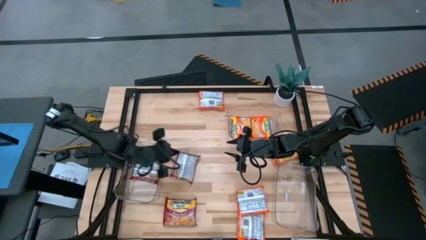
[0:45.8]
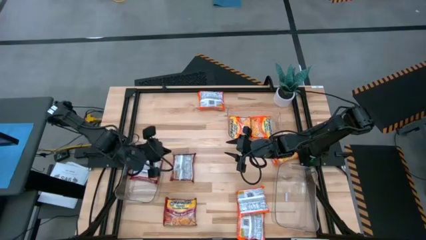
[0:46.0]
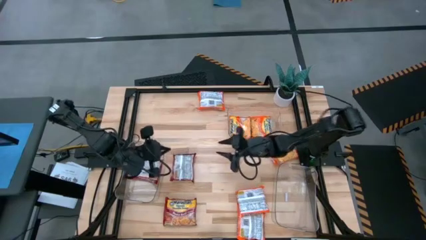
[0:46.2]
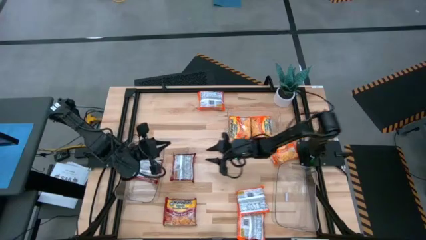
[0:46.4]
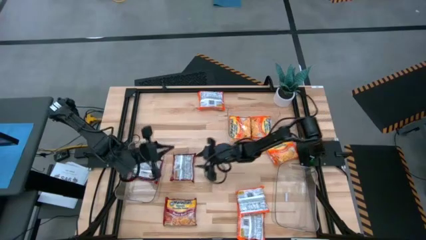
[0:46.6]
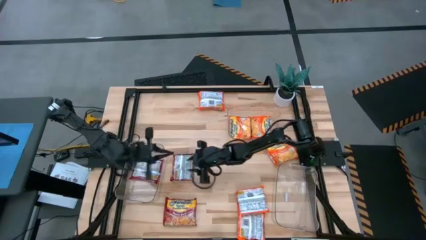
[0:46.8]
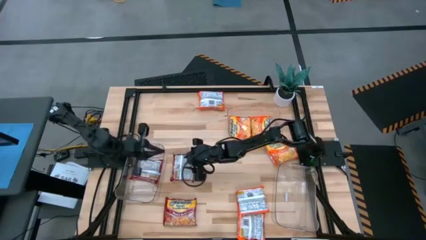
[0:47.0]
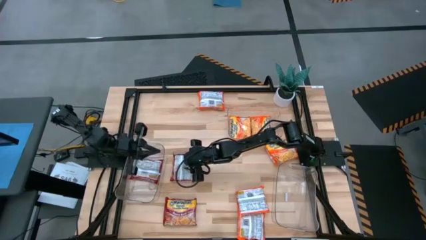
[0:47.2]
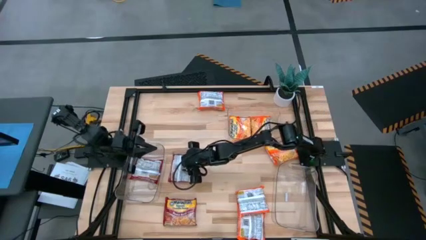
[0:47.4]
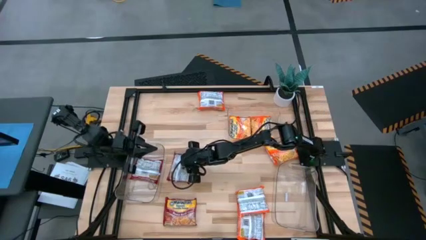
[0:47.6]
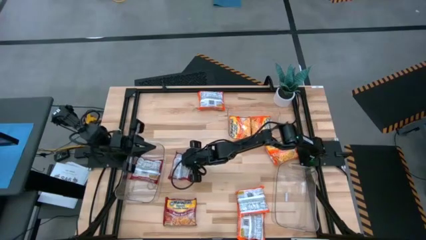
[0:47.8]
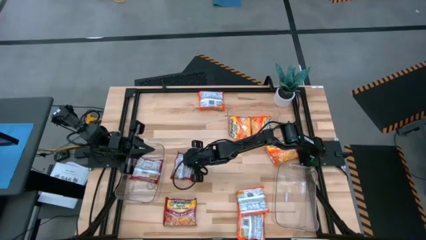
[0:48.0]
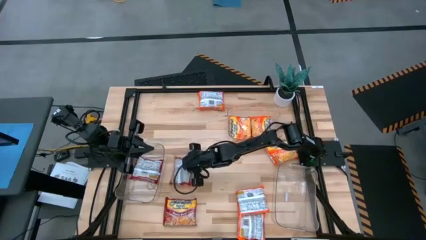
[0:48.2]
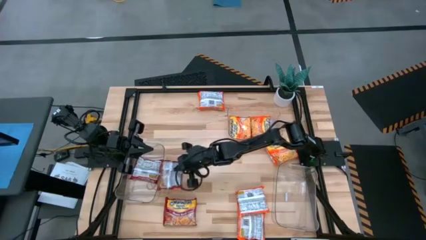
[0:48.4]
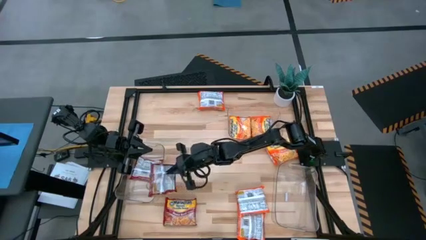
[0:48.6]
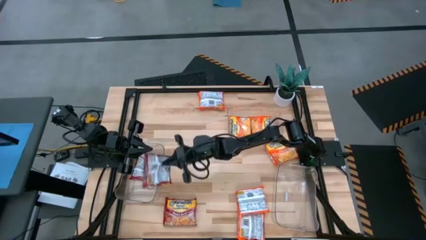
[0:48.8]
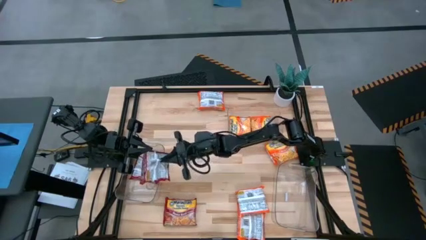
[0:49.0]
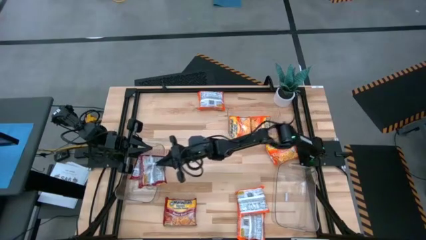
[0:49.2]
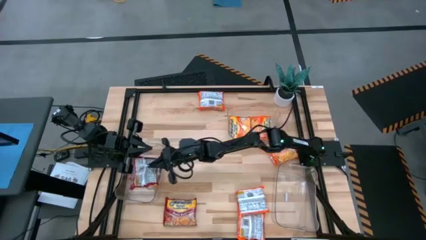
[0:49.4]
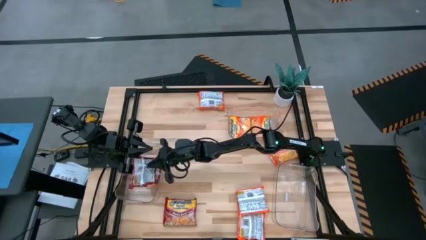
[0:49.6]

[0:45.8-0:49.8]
Task: Sort Maruchan noodles
Put the red noodle pack into the bottom left transparent bin

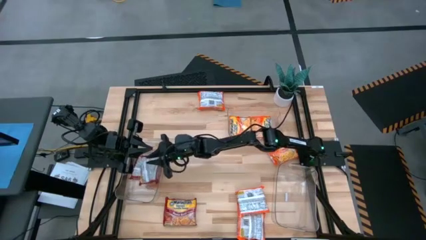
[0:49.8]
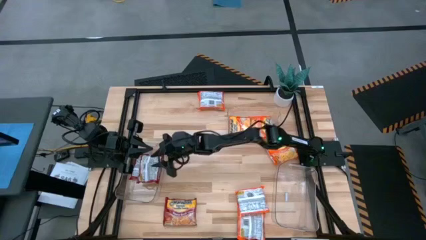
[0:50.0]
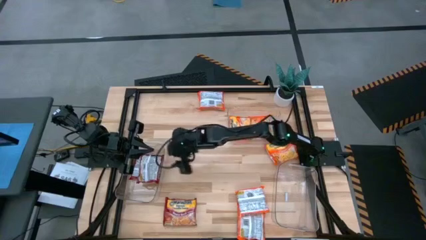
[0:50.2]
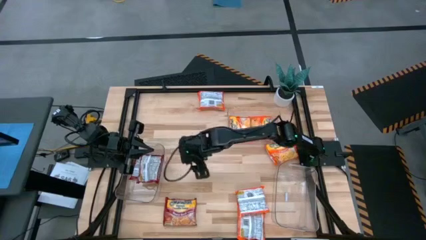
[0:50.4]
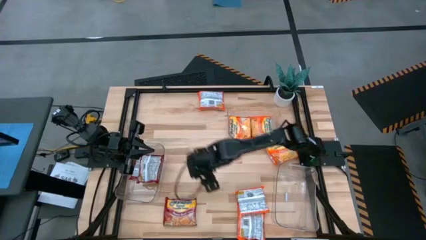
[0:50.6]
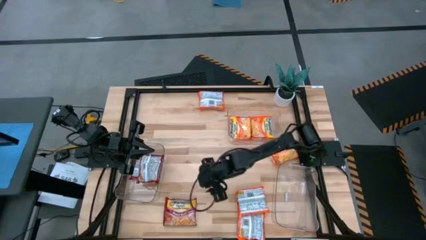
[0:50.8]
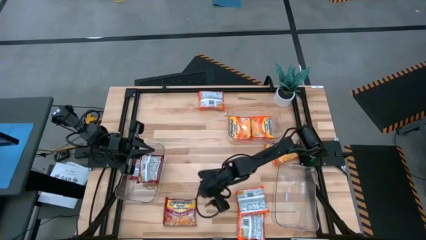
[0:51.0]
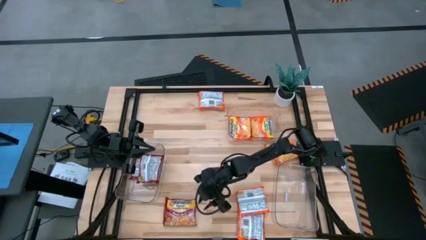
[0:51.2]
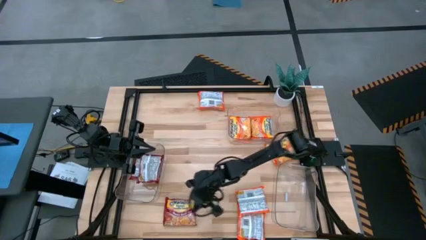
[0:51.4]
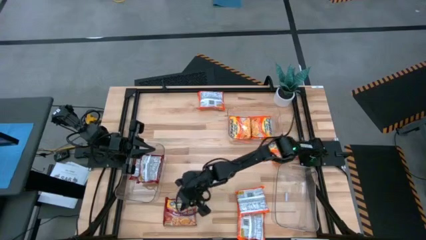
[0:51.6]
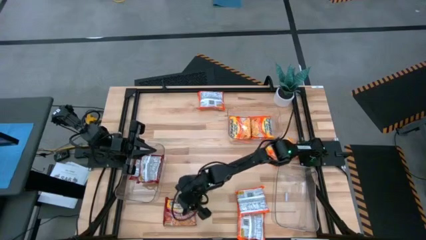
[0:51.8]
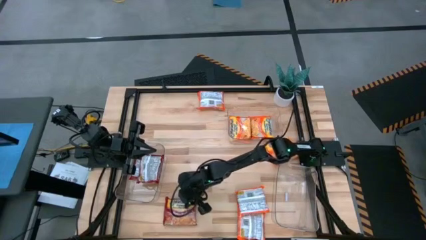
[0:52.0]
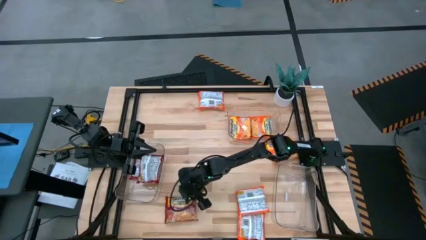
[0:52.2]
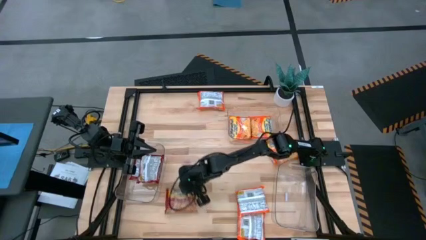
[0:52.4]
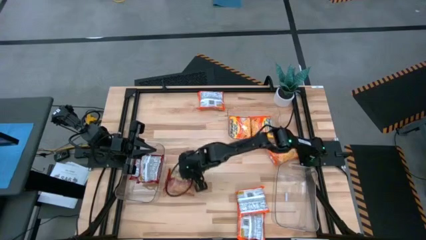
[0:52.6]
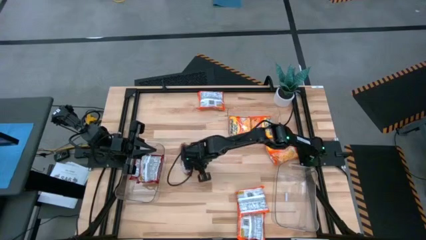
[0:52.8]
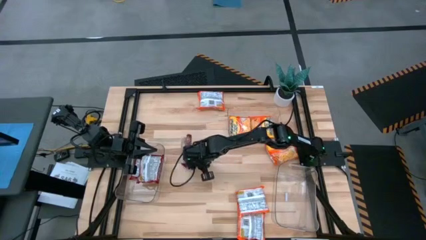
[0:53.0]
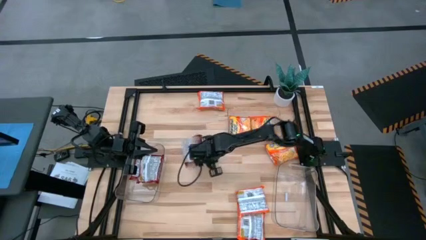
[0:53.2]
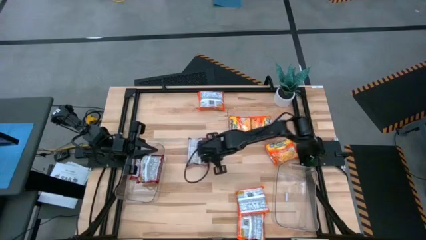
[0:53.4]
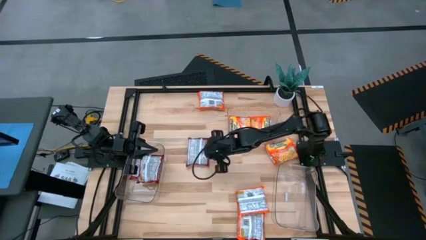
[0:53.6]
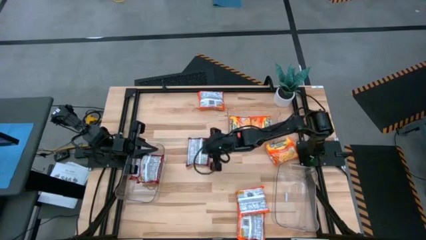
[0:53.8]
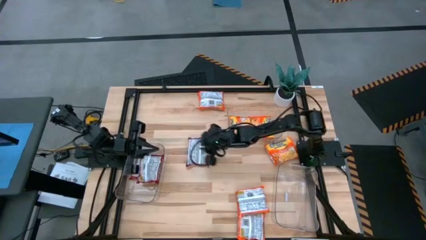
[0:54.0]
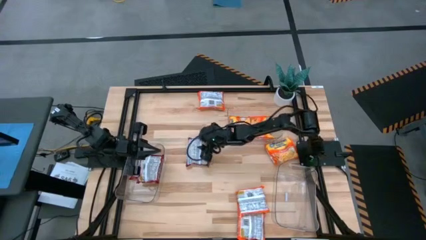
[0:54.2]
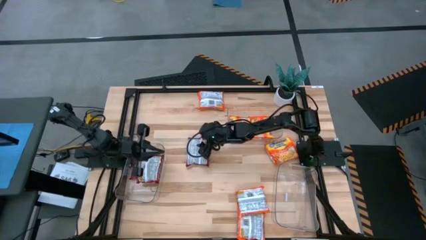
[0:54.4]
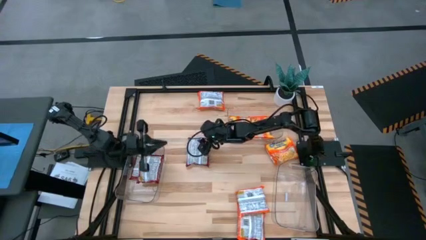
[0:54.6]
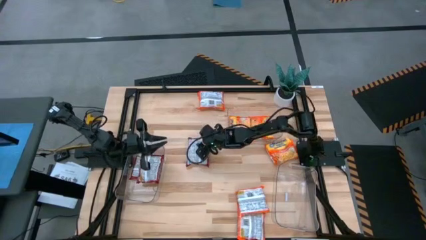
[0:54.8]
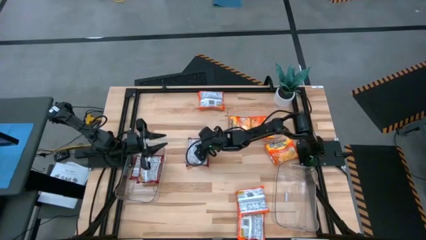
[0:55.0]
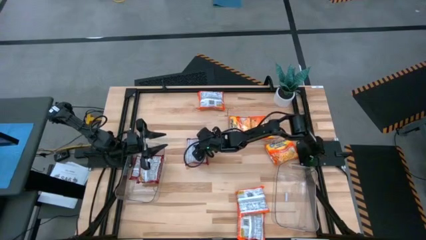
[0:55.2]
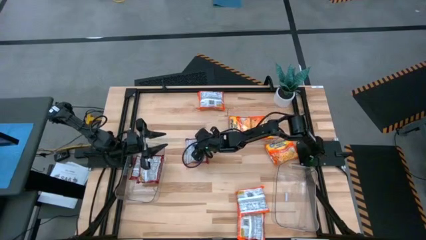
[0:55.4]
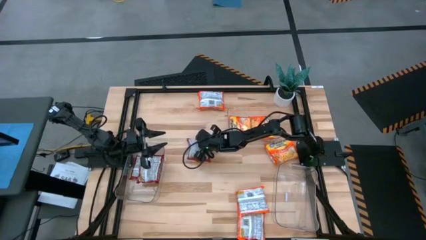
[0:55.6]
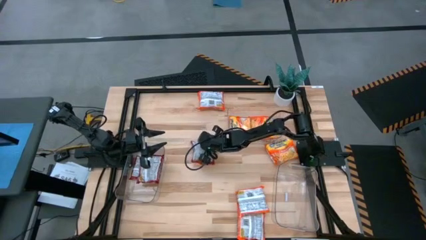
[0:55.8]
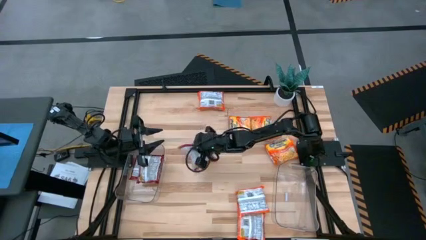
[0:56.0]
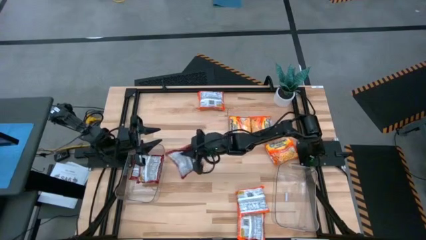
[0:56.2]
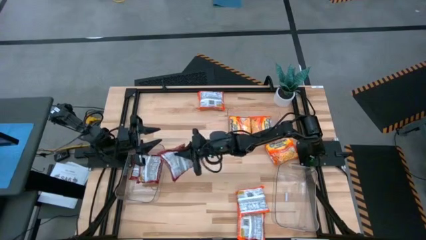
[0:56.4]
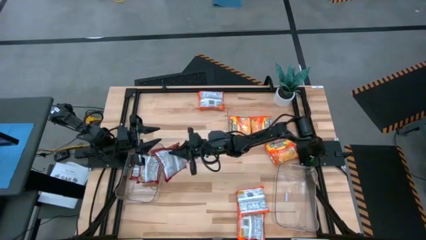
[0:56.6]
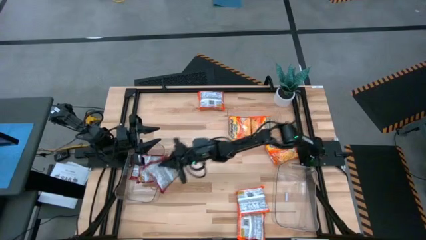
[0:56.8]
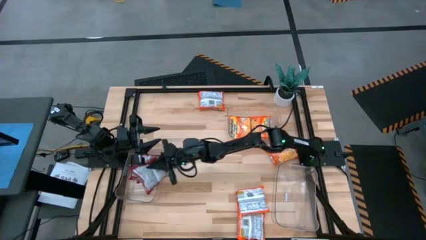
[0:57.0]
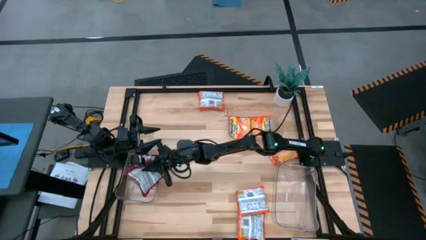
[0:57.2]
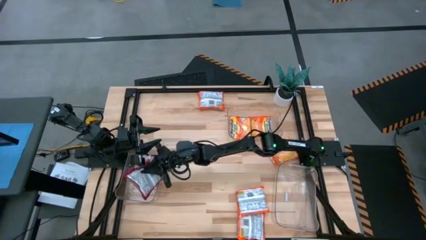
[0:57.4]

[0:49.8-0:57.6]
Put the red noodle pack into the bottom left transparent bin

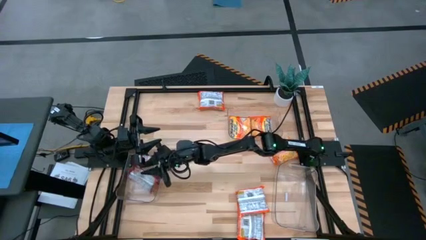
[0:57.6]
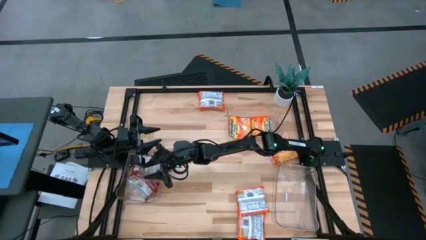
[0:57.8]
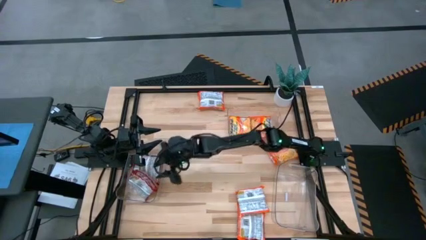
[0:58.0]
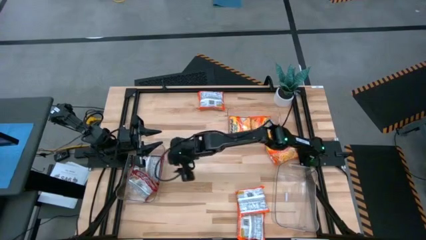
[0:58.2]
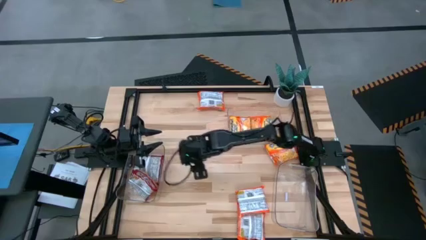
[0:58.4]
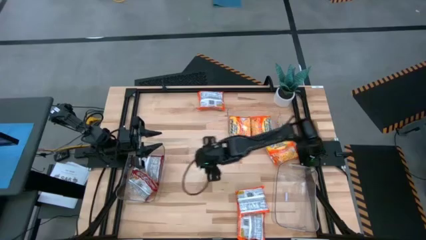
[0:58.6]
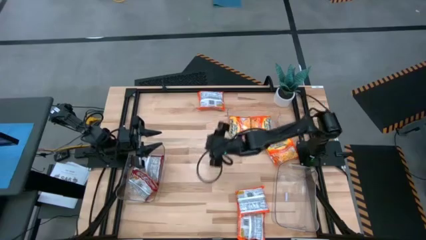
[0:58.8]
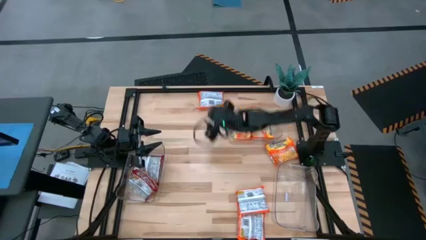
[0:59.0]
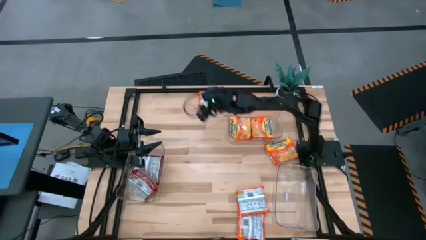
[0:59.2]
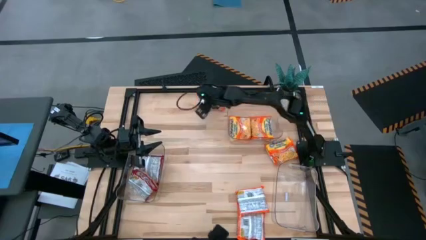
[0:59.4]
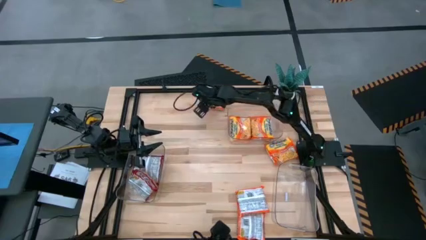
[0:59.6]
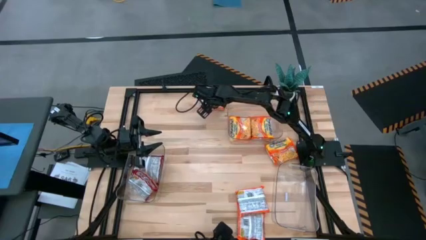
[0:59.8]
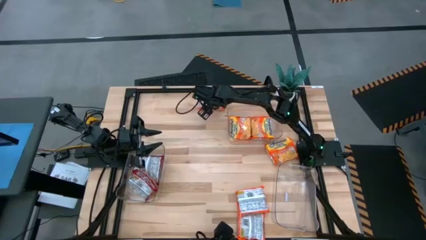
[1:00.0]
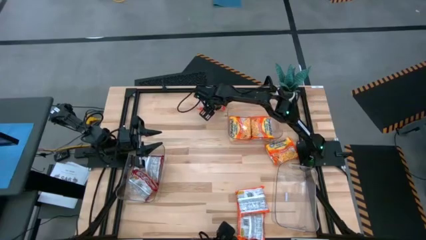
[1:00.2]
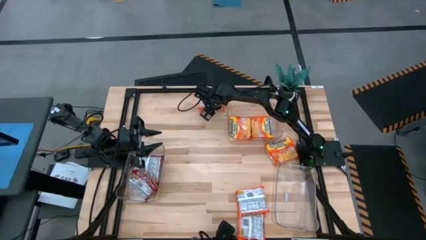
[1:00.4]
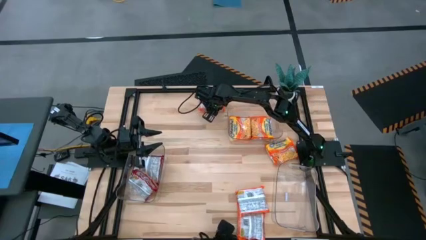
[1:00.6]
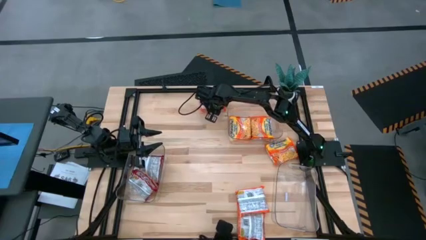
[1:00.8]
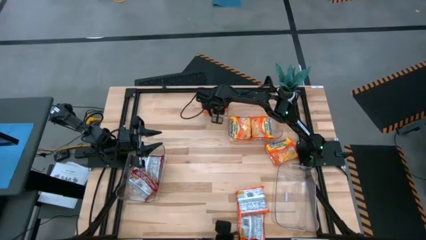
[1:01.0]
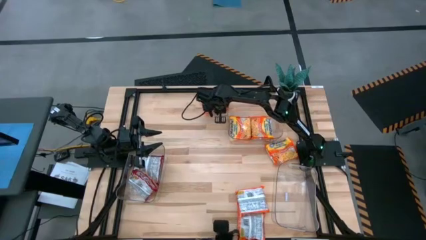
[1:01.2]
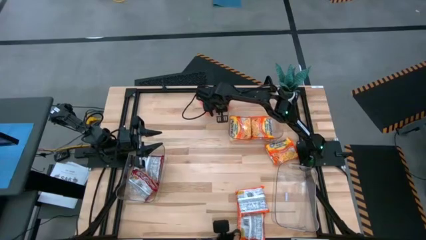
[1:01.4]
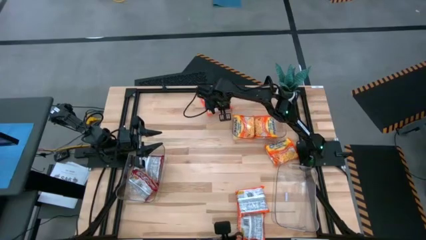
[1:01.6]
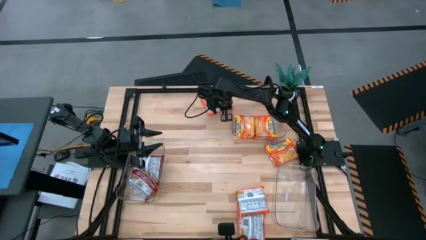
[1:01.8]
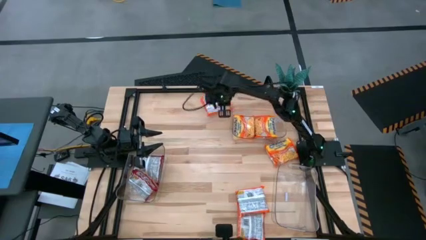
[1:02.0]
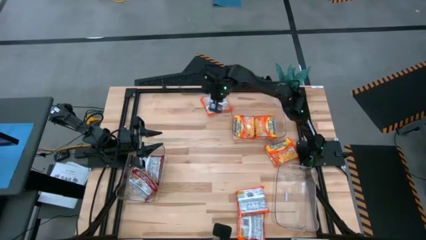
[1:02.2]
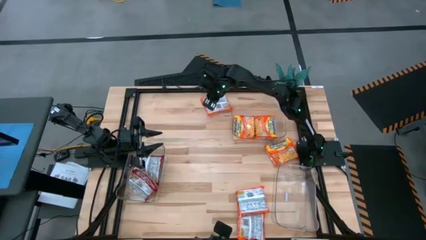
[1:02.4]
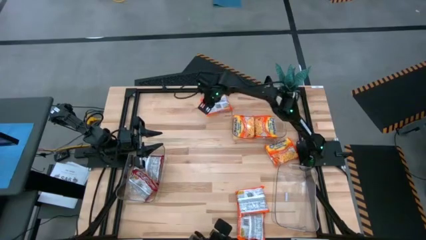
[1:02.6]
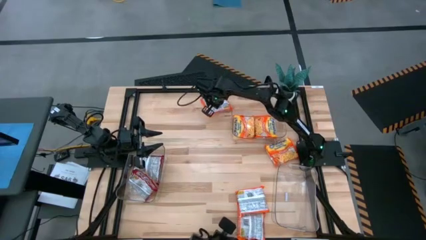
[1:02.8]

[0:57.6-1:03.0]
Put the orange noodle pack into the top transparent bin
